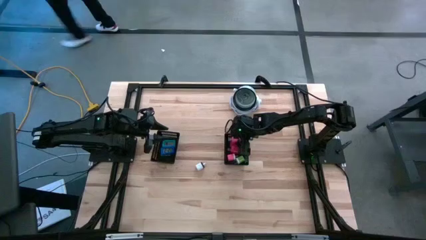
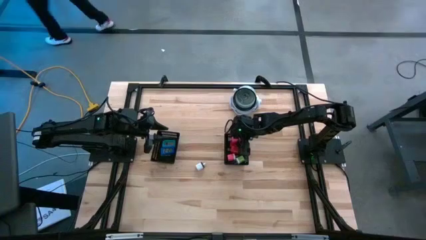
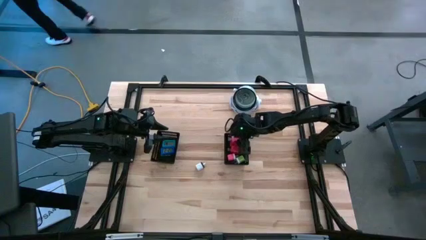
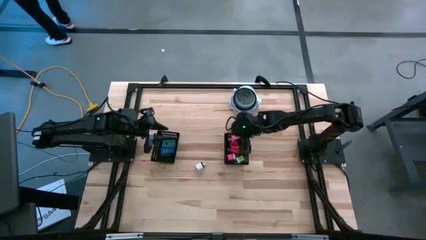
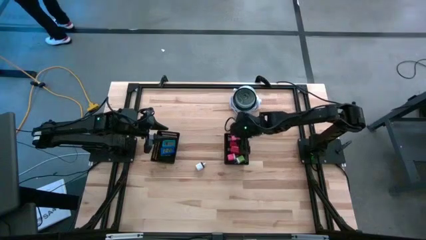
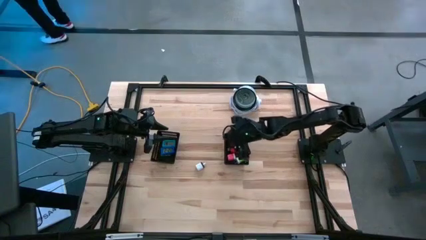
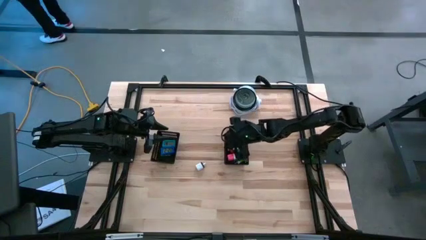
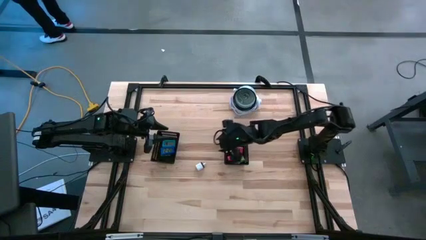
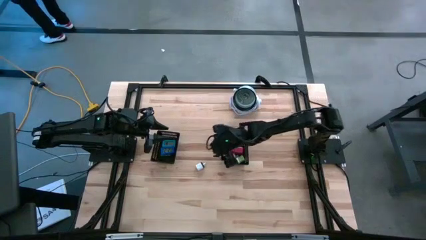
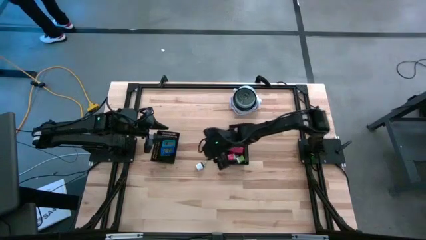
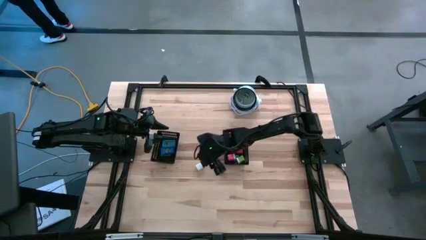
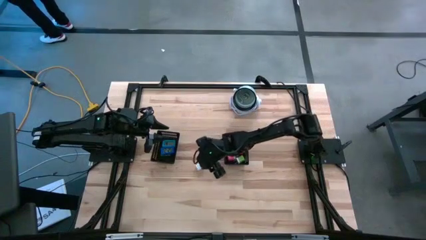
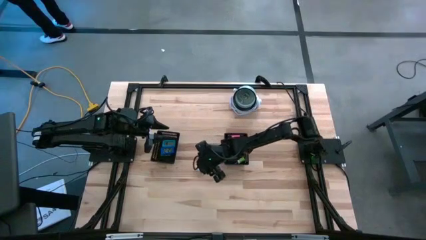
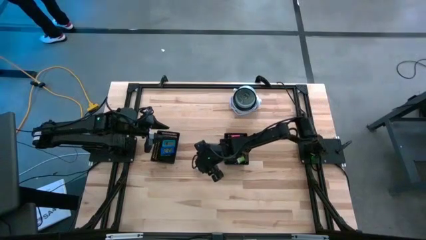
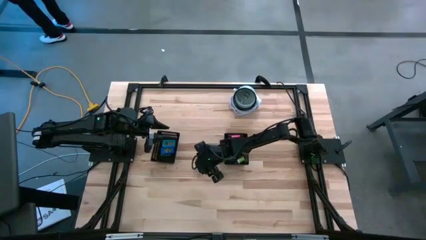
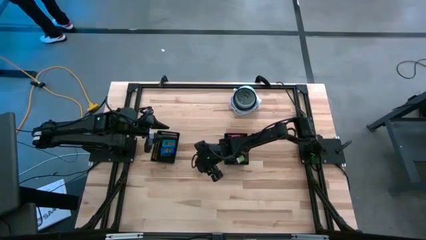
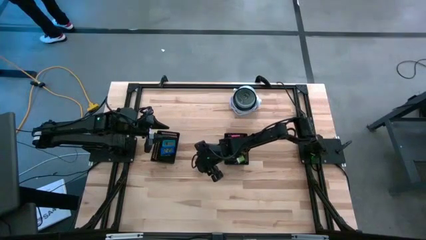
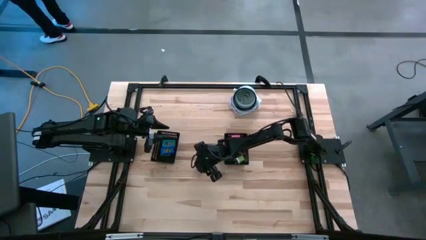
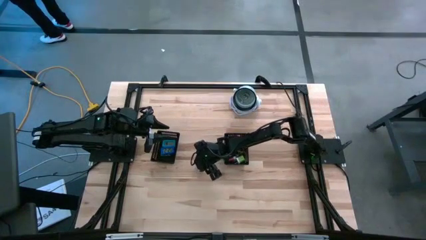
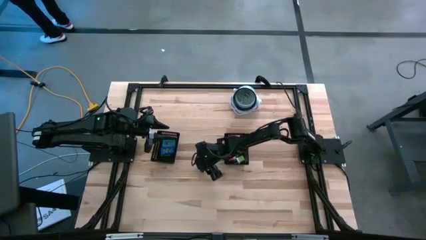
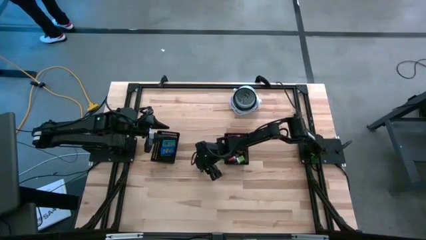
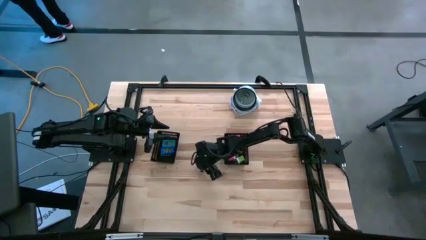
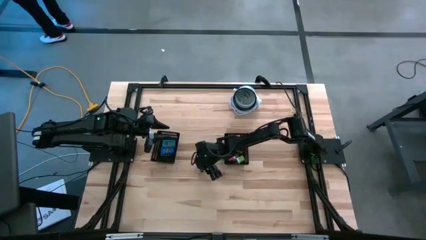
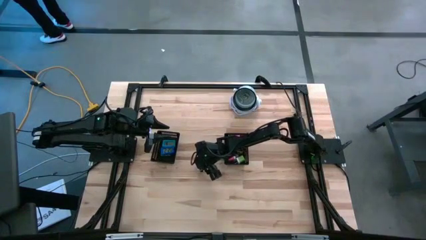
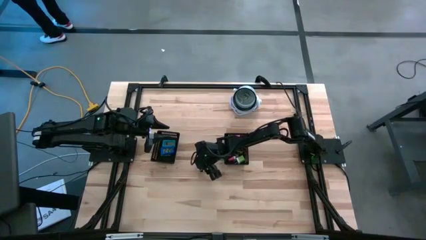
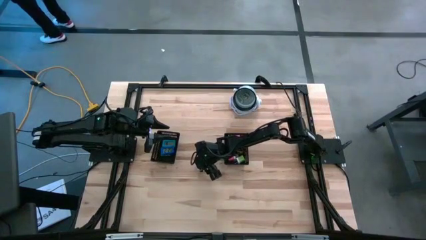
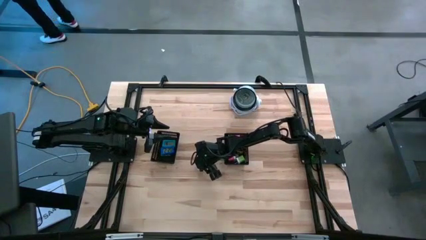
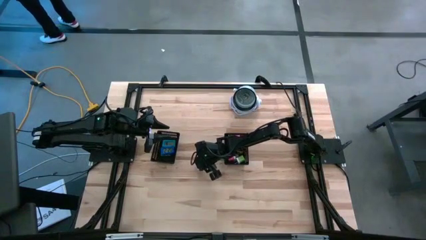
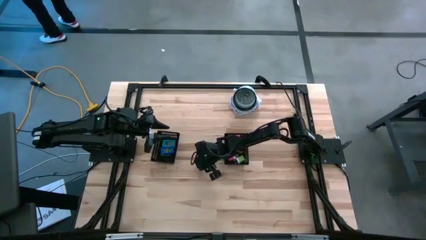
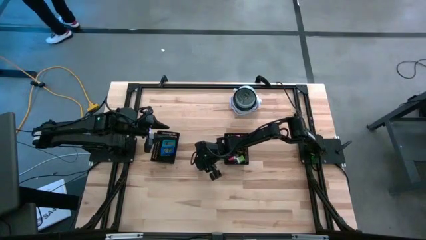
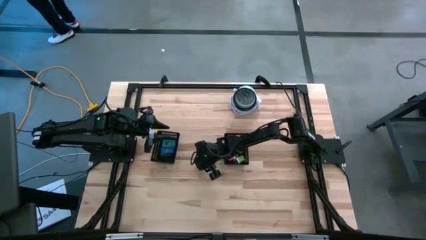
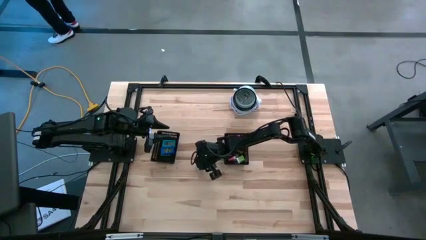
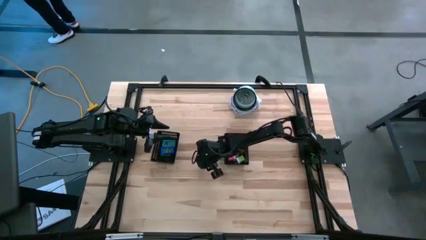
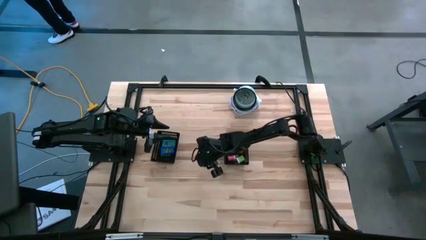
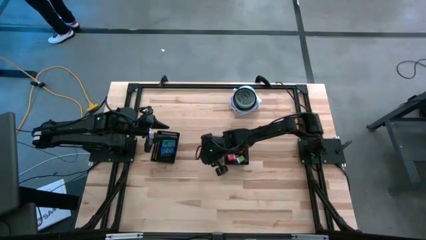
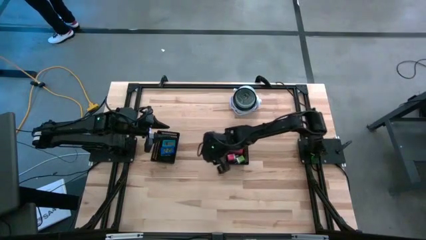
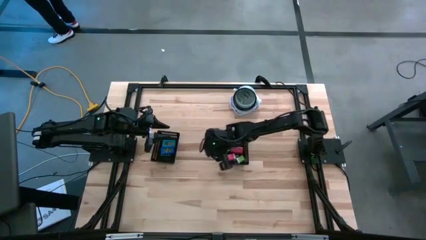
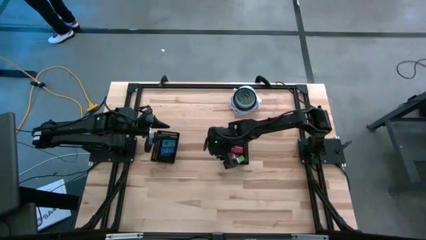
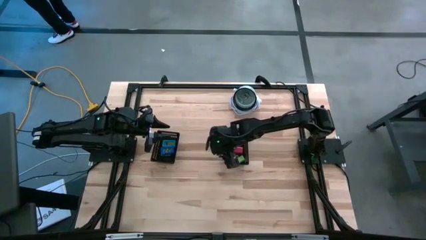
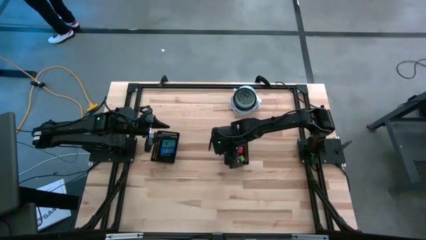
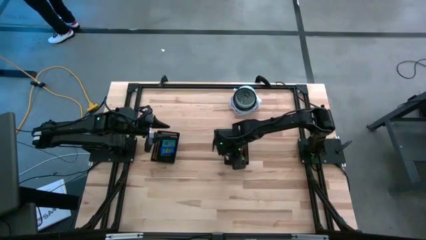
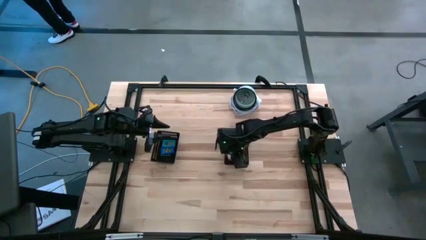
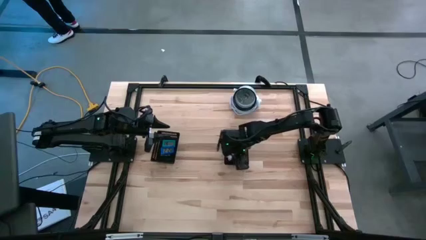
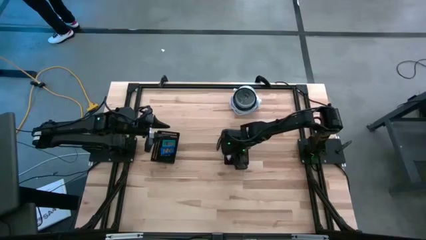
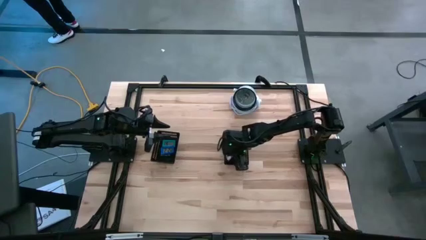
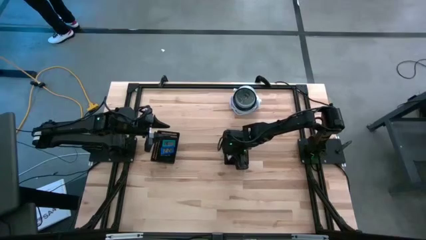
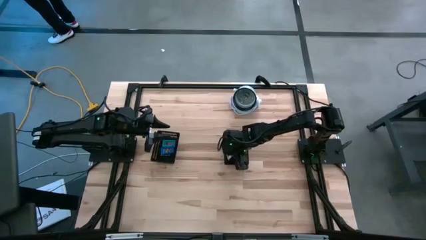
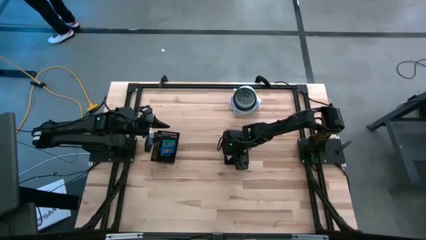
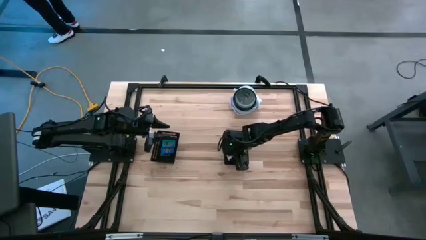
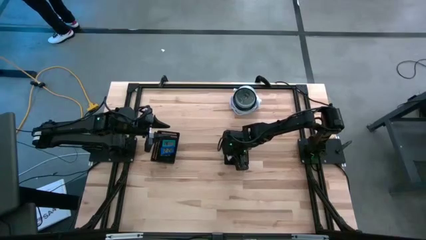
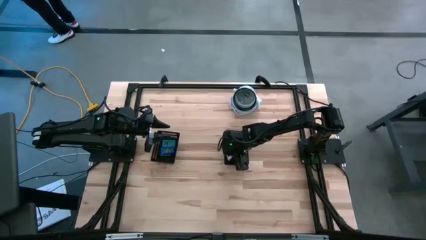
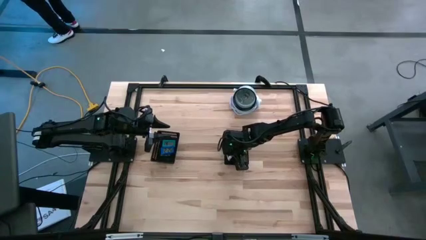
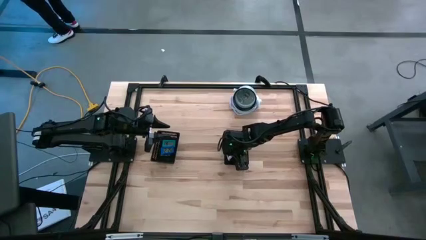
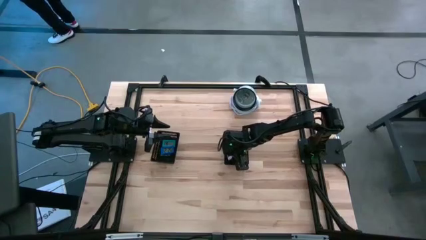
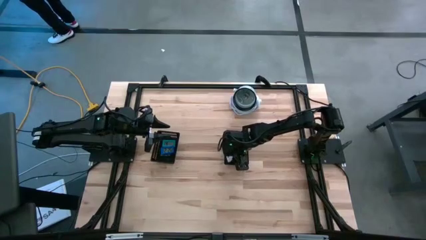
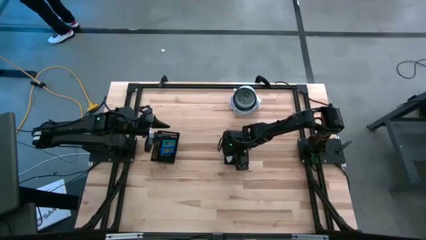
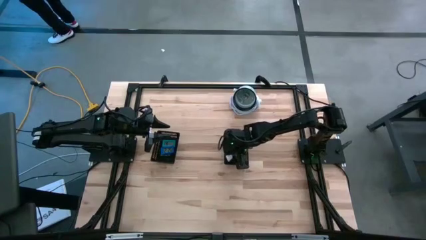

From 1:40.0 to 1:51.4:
Task: Pick & Place Office items
Put the white charger adapter into the right black bin

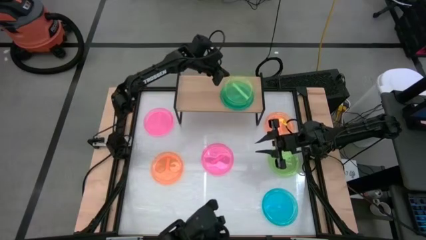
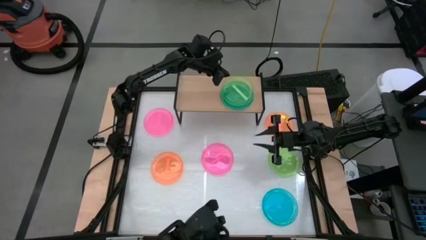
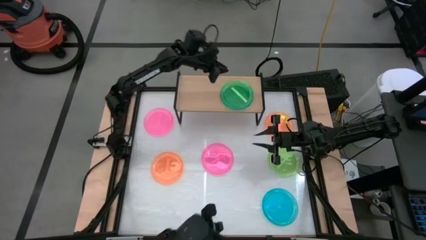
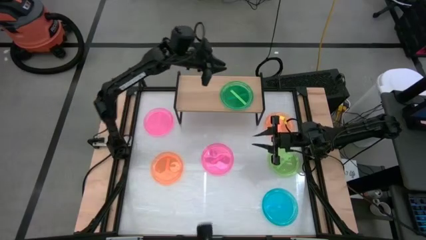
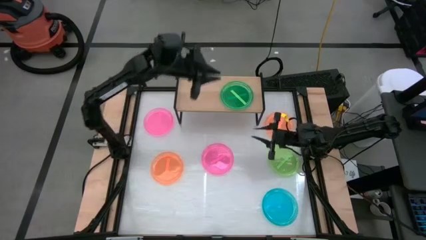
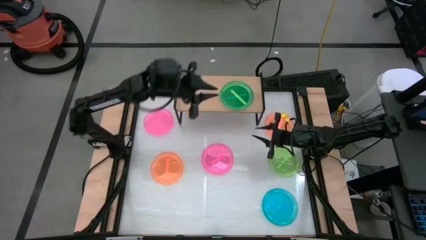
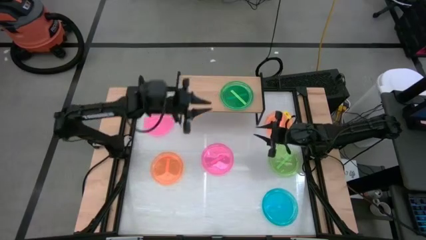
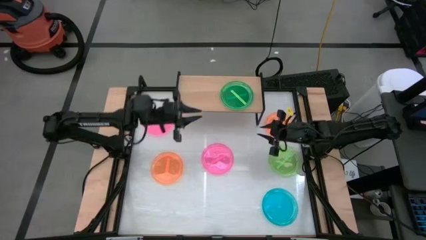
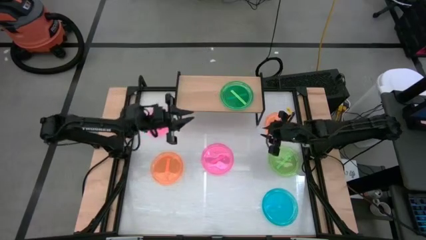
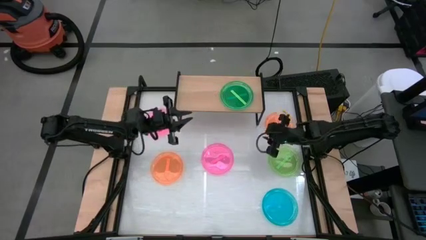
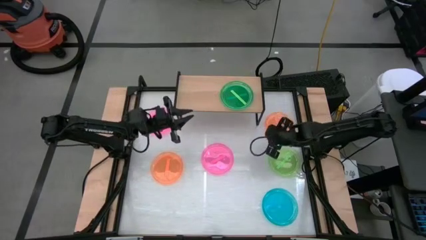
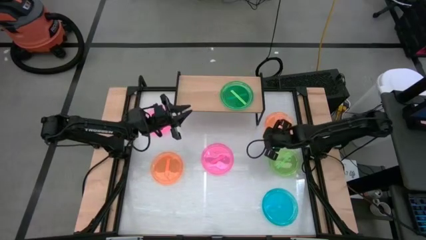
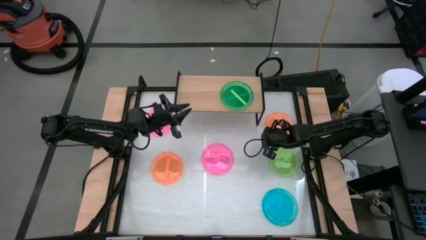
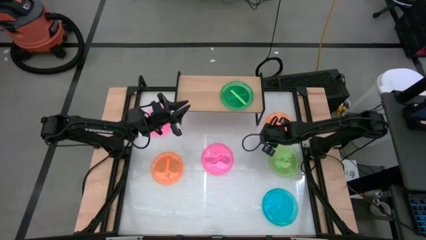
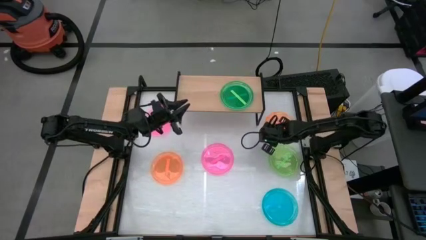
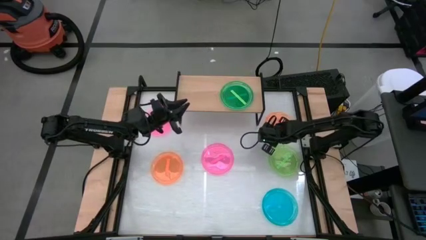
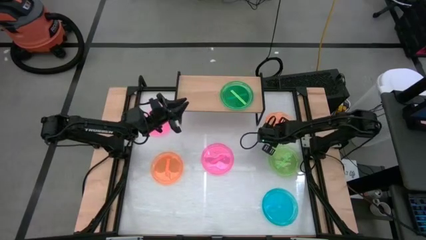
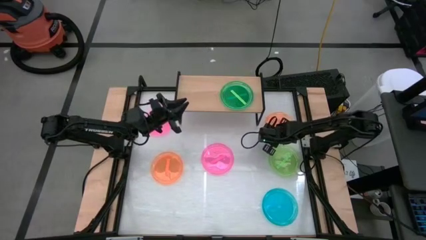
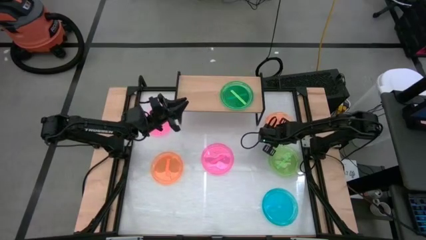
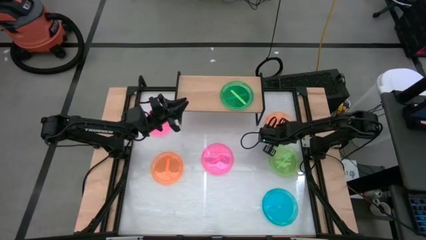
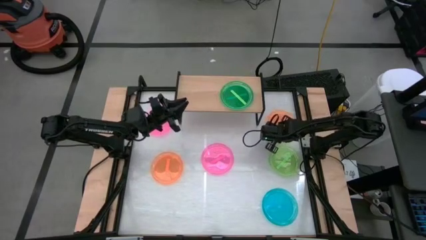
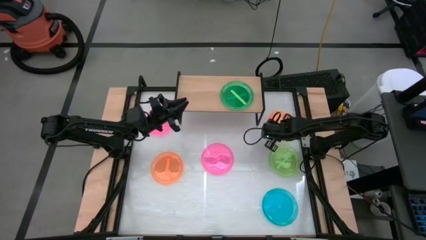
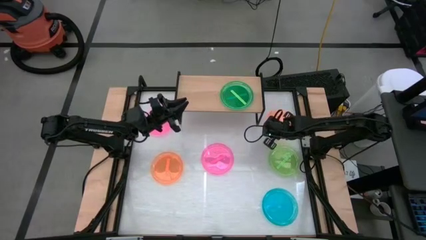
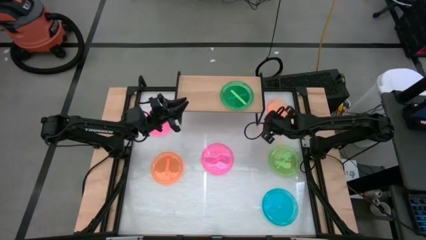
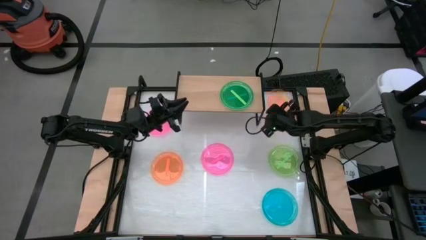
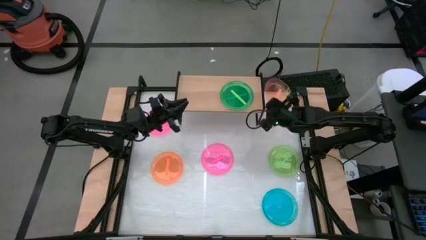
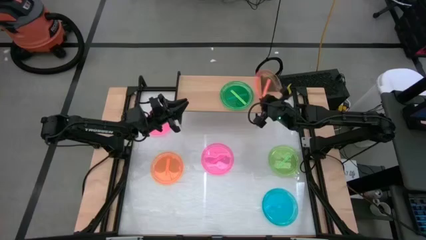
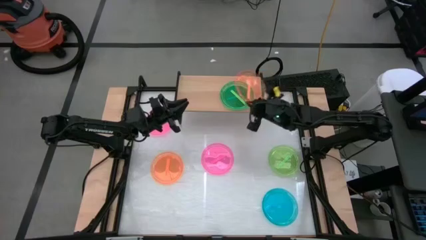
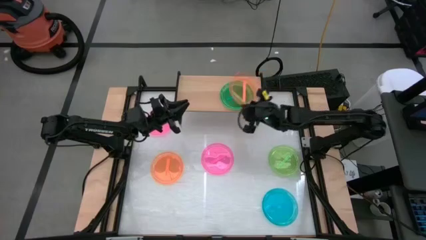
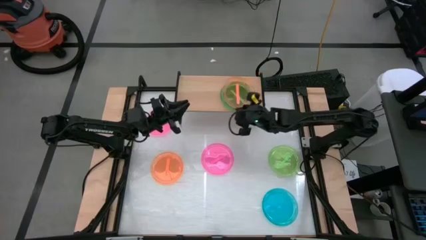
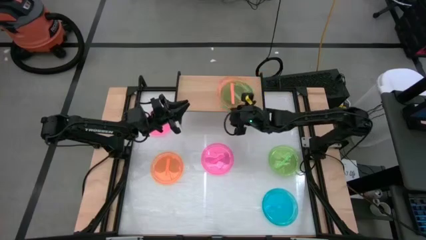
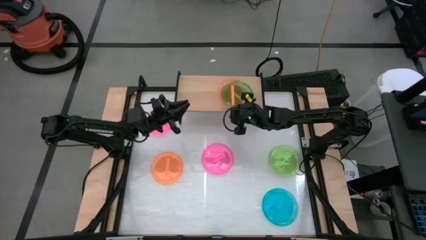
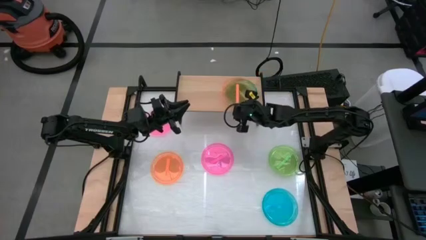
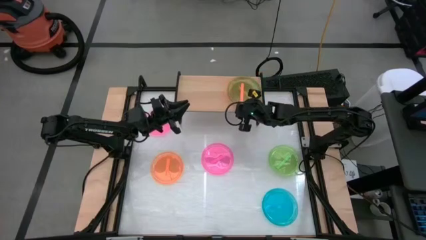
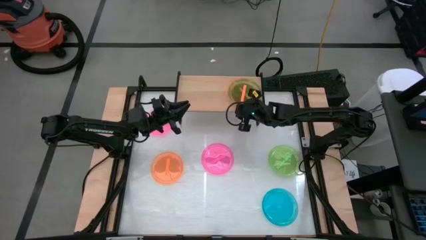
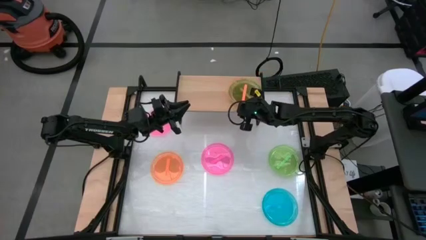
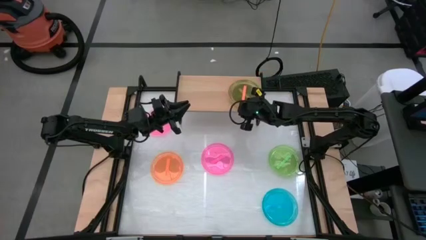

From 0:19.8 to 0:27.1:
Task: Place and stack plates onto a shelf
Stack the top orange plate on top of the green plate on the shelf
